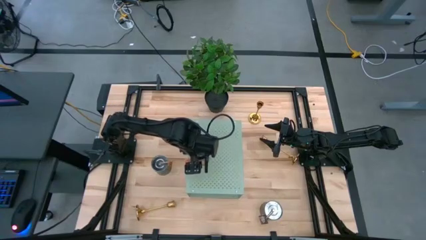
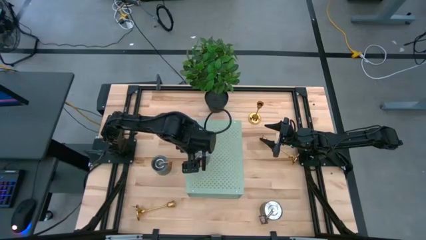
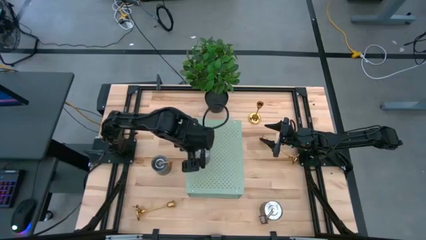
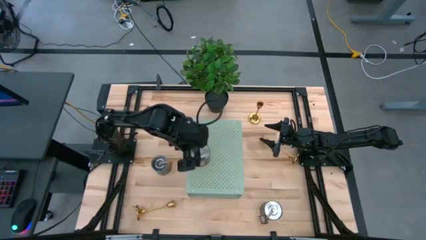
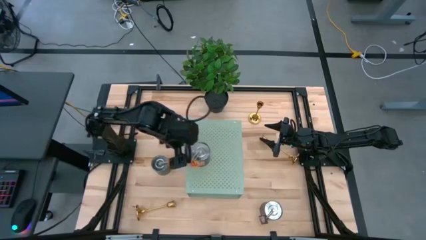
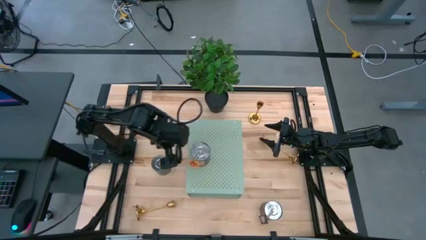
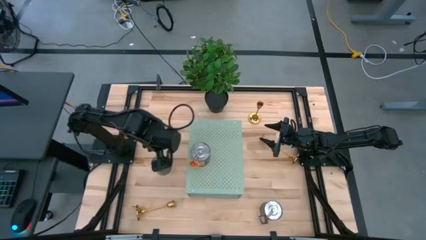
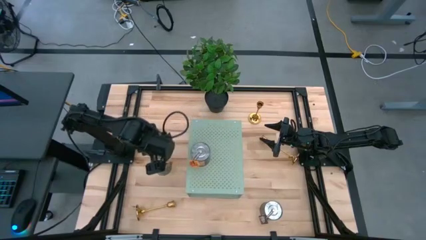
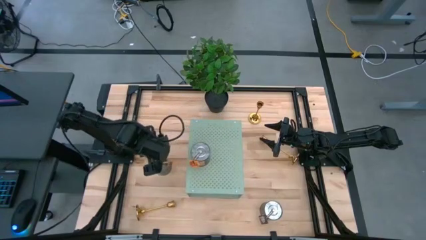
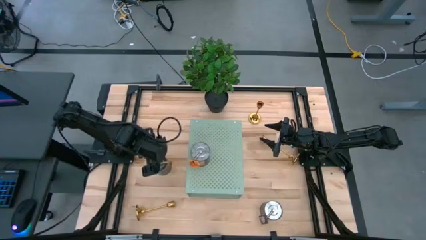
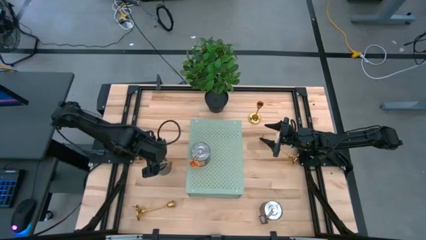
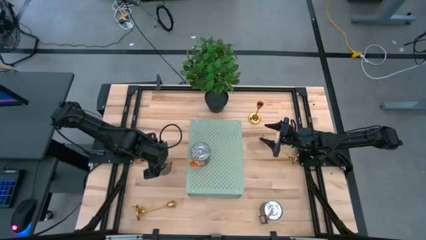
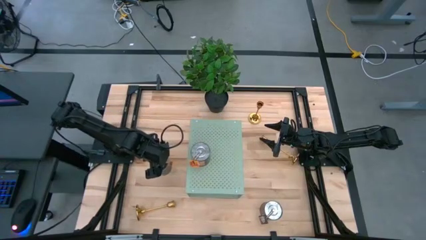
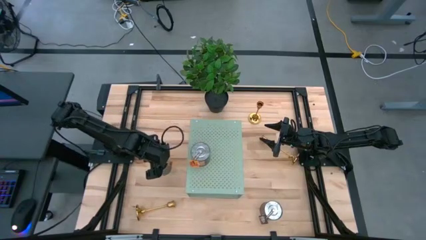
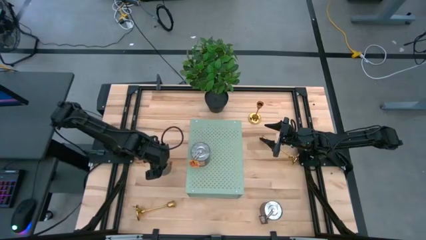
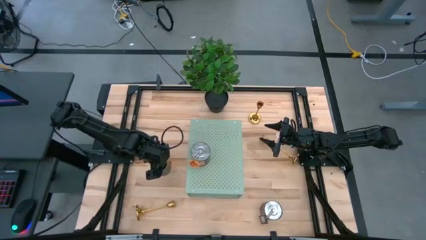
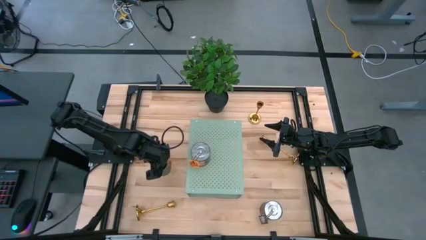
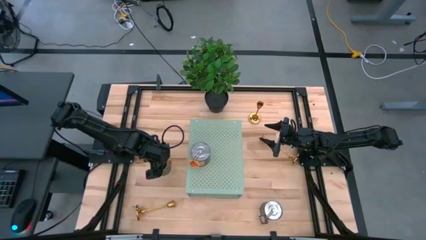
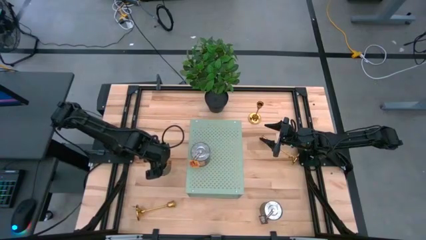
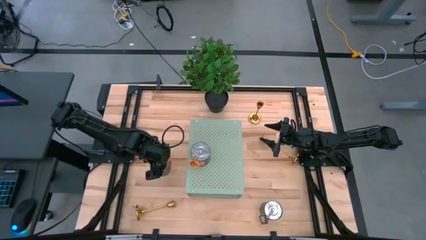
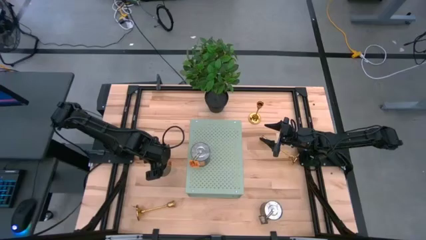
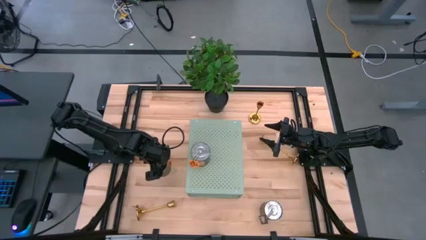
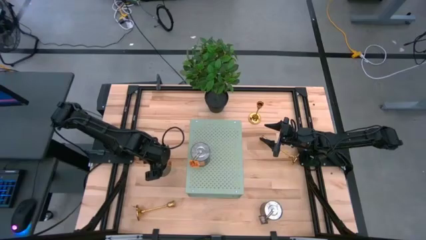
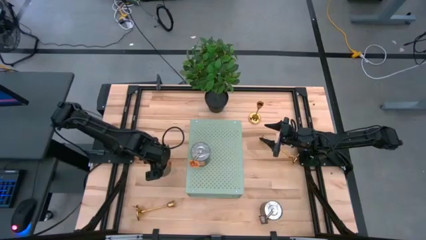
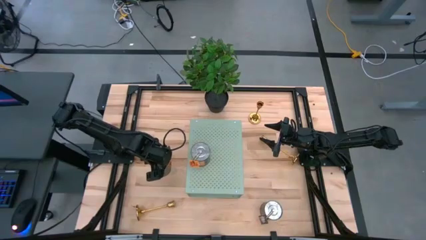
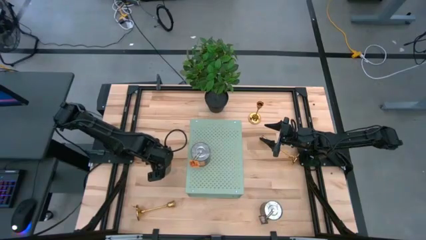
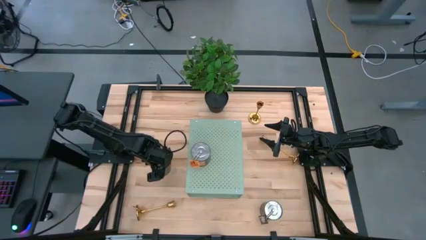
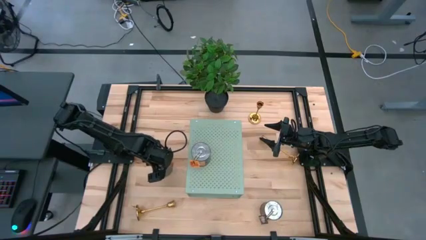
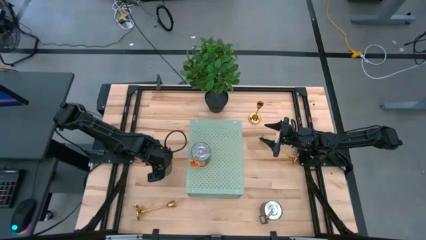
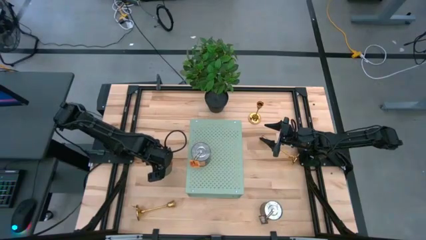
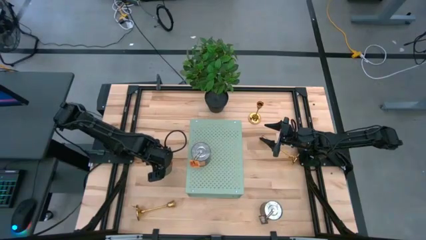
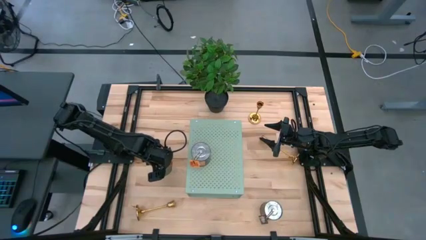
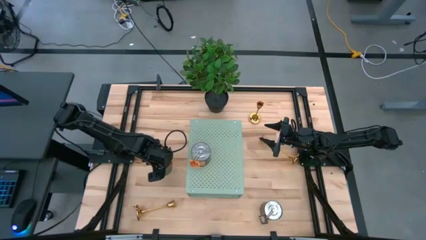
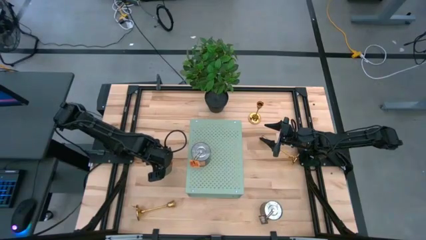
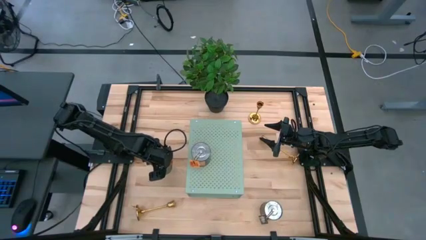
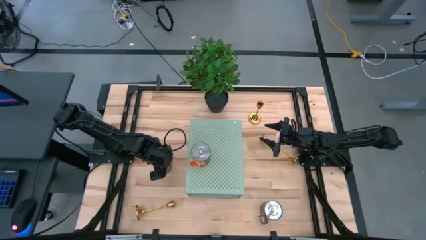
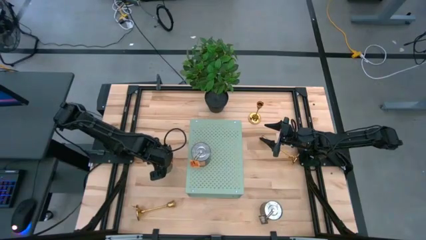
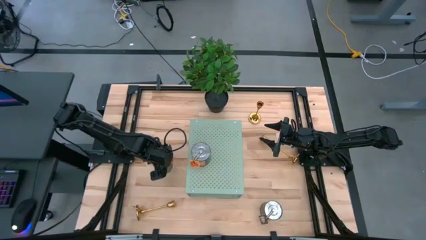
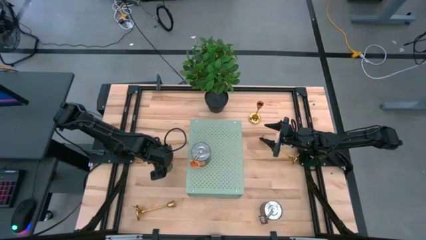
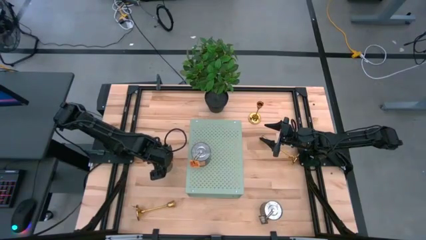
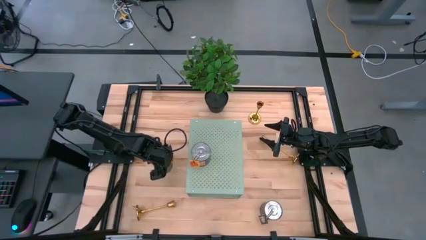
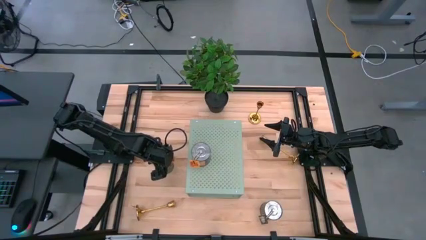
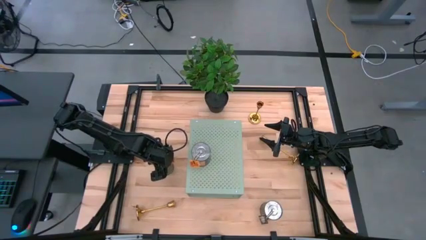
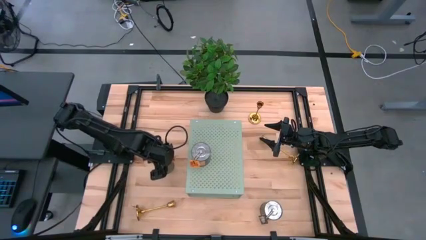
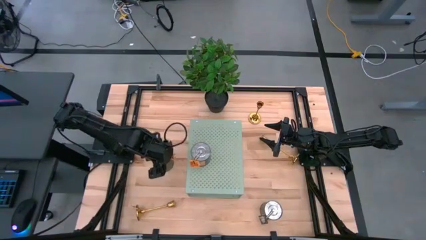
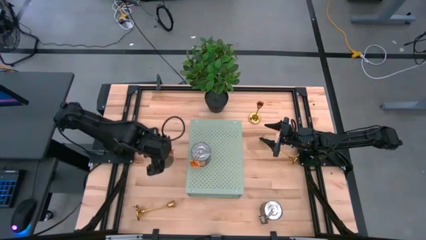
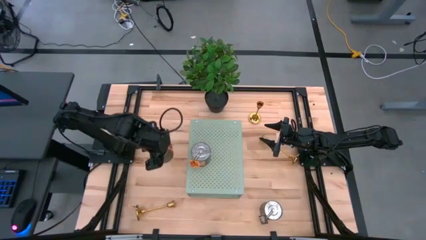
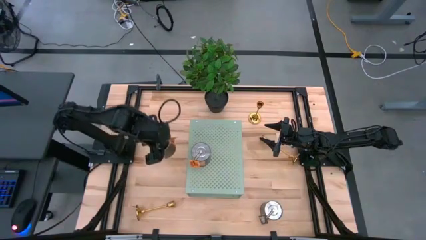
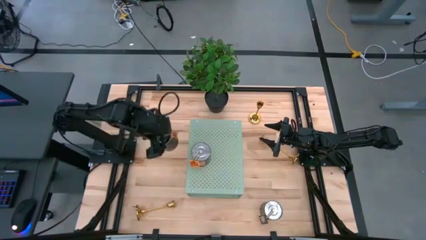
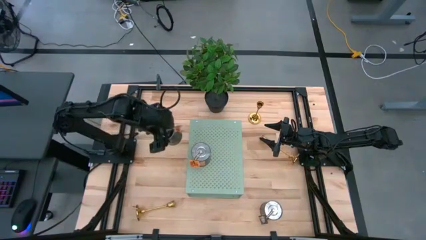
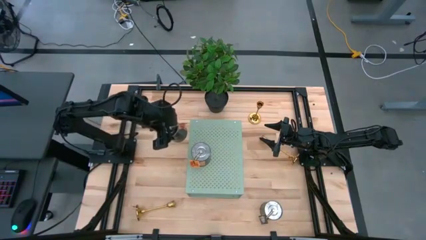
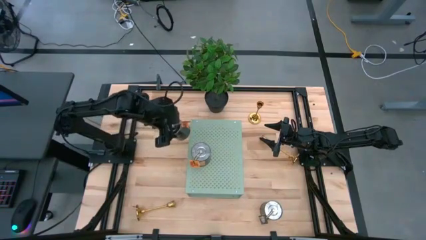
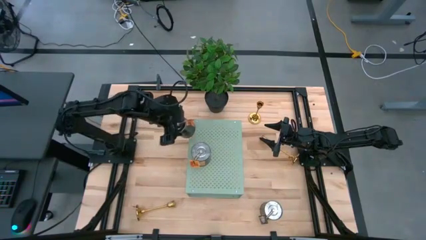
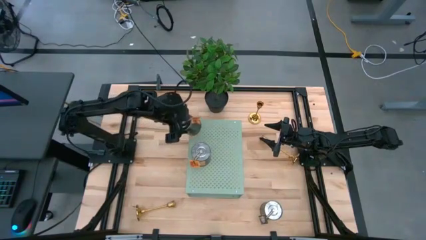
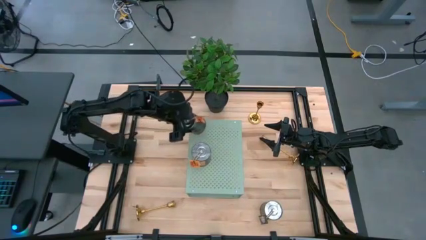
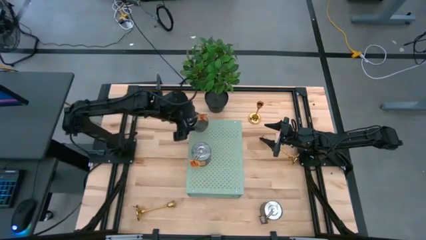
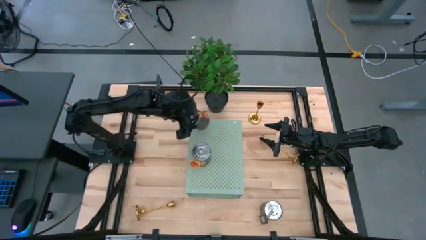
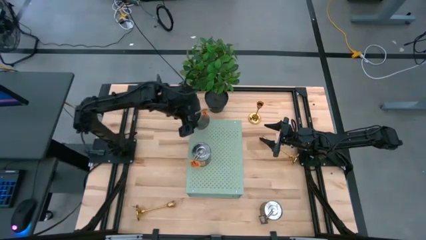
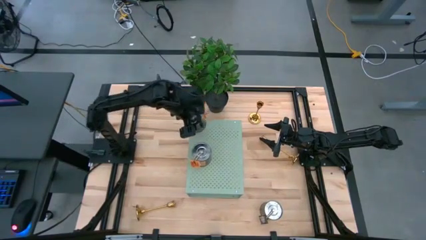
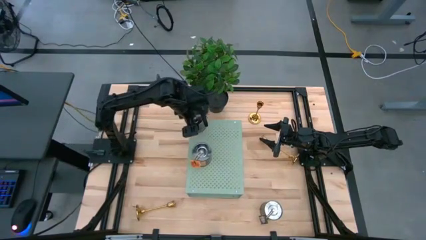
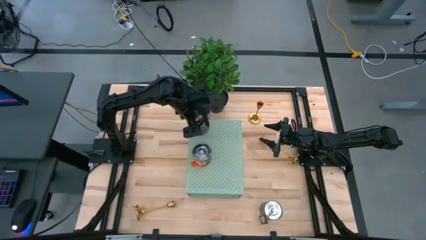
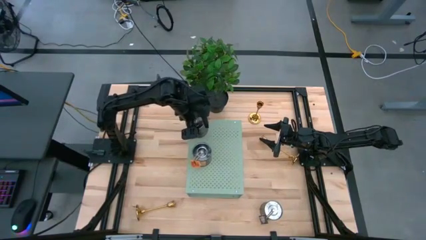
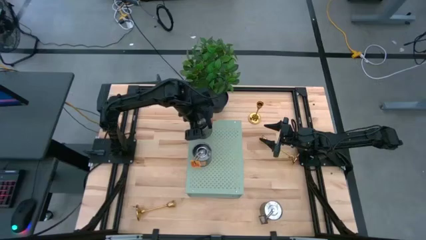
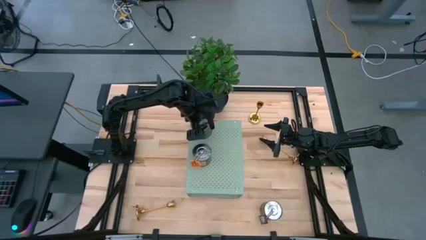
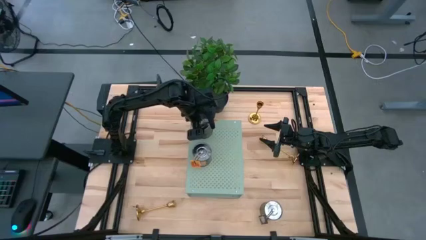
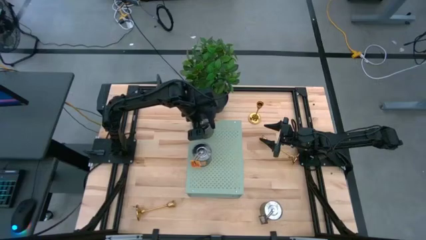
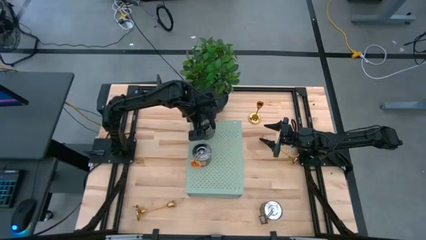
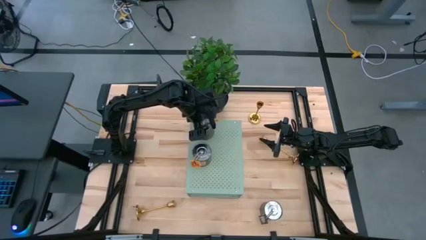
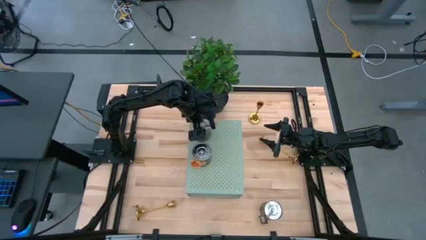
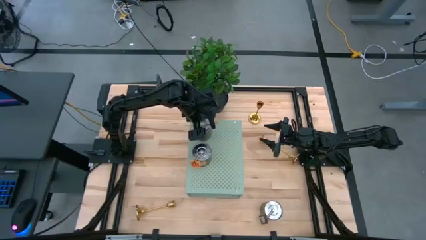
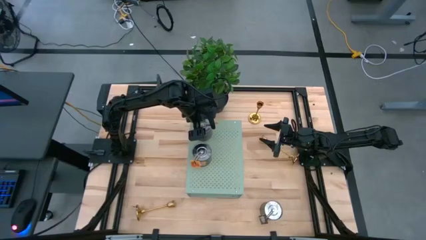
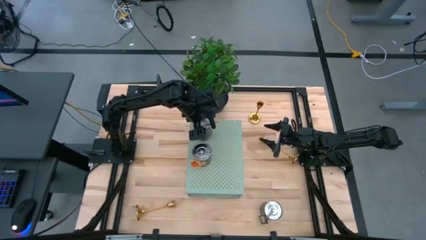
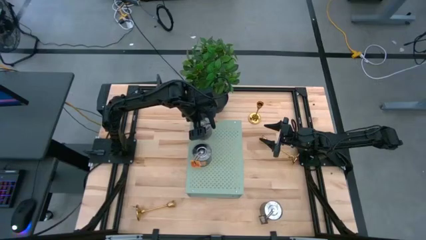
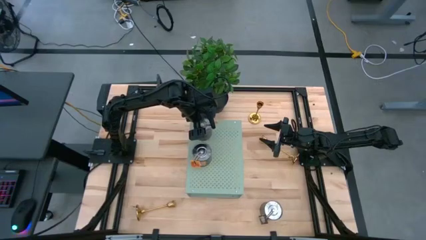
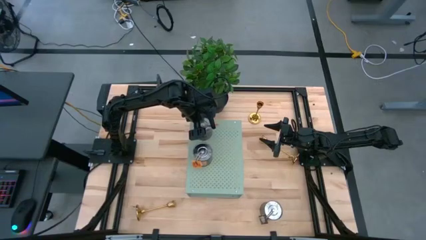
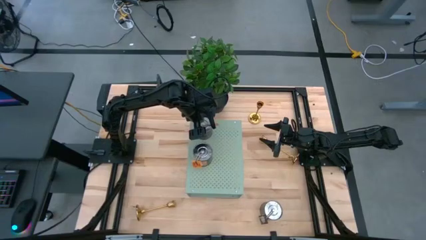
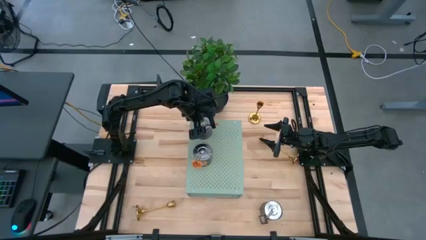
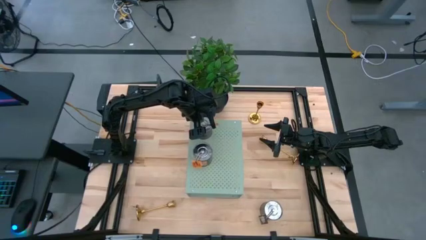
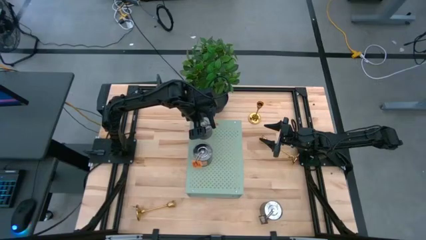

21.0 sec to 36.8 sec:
Task: Pick & Place candle stick holders
Align the orange scented candle with the other orange scented candle on the shelf
